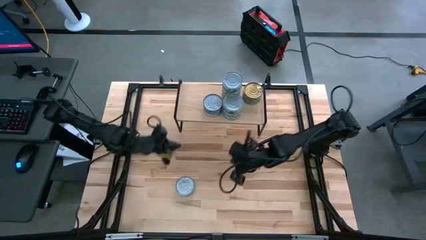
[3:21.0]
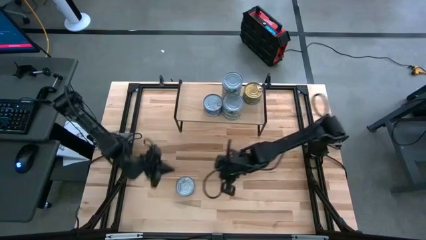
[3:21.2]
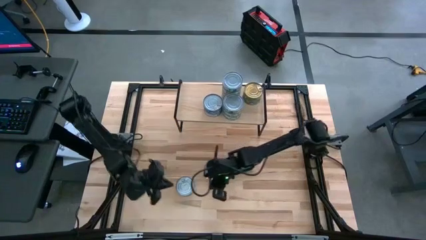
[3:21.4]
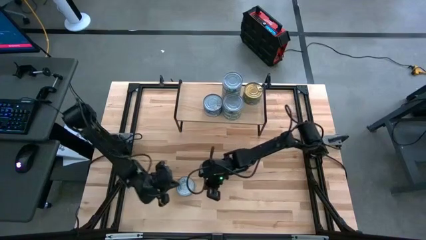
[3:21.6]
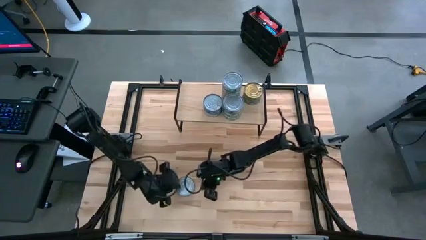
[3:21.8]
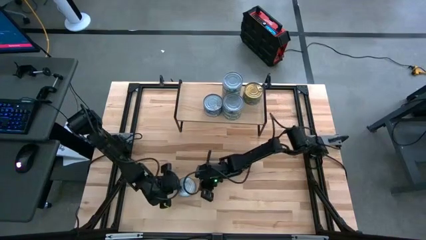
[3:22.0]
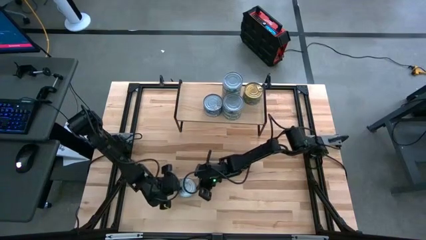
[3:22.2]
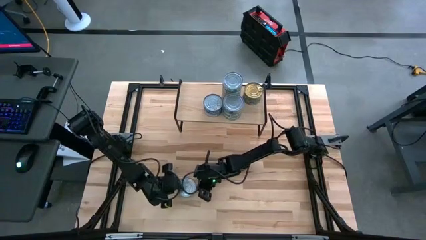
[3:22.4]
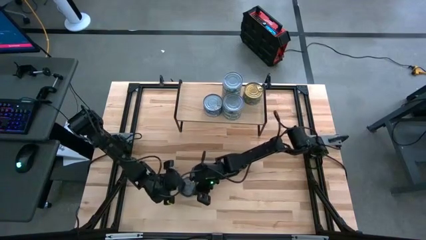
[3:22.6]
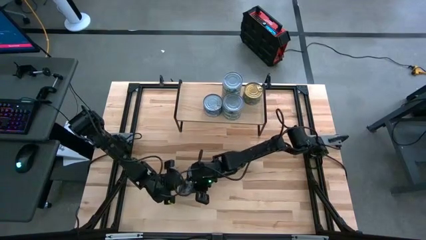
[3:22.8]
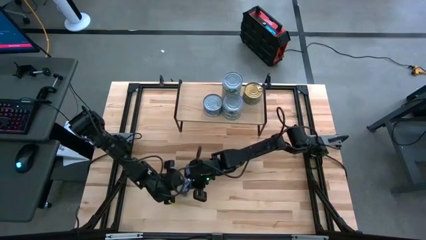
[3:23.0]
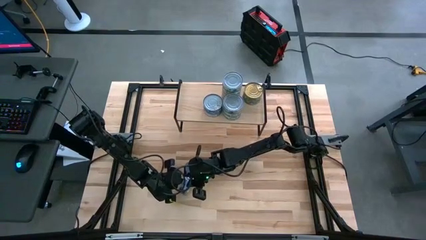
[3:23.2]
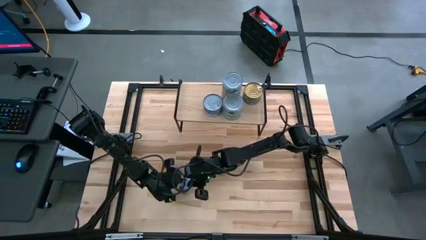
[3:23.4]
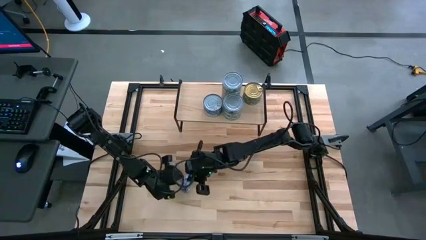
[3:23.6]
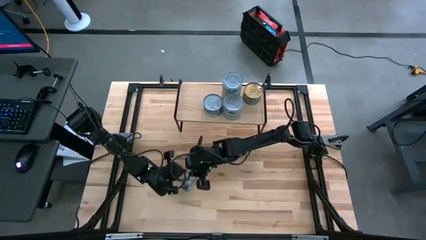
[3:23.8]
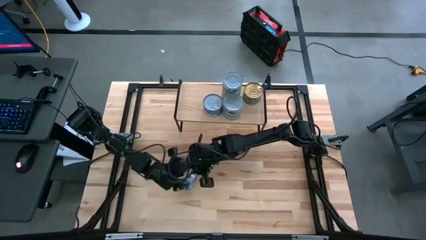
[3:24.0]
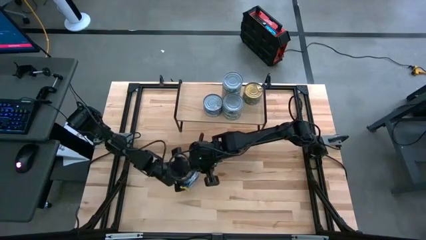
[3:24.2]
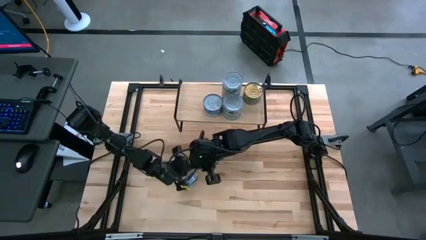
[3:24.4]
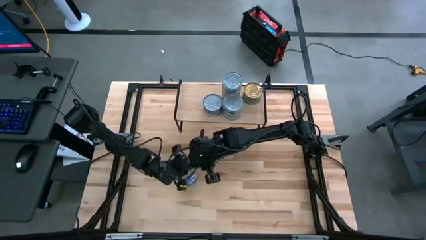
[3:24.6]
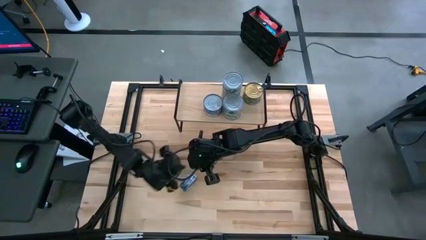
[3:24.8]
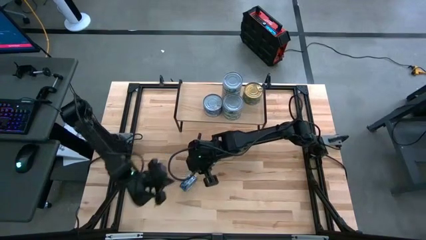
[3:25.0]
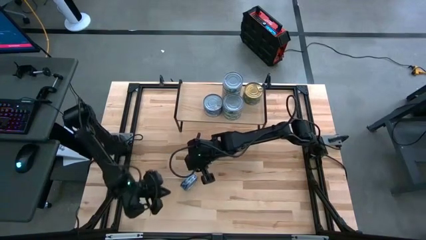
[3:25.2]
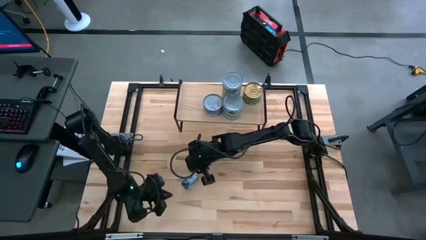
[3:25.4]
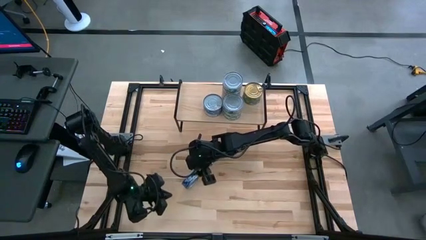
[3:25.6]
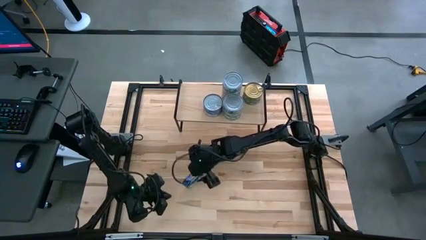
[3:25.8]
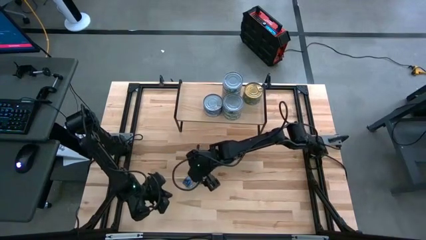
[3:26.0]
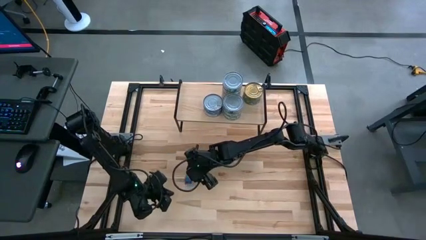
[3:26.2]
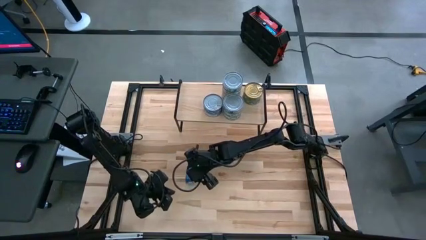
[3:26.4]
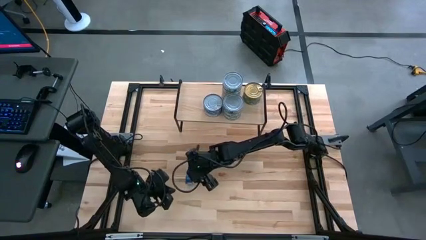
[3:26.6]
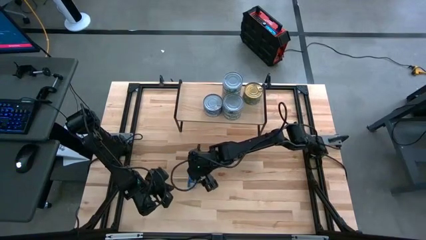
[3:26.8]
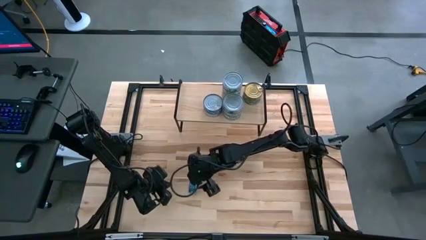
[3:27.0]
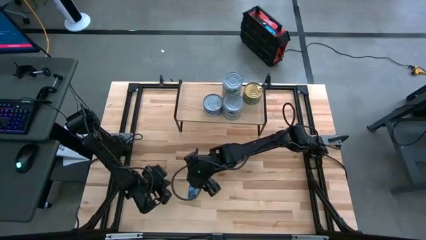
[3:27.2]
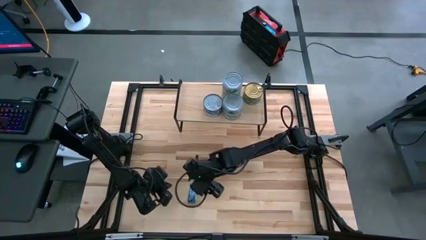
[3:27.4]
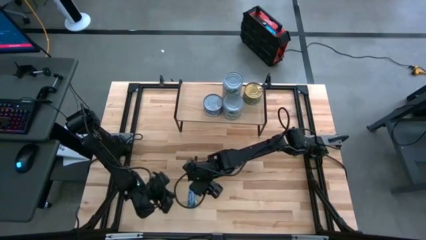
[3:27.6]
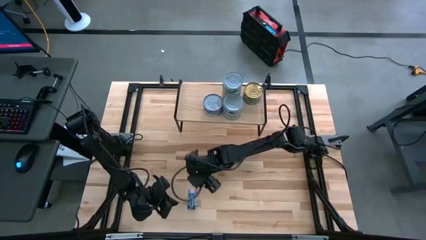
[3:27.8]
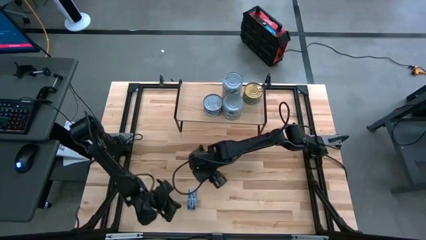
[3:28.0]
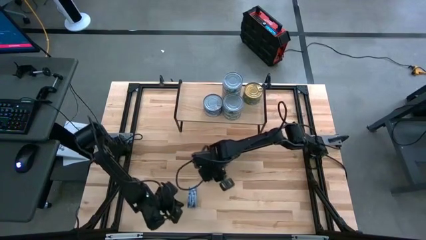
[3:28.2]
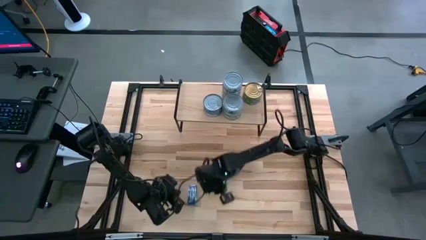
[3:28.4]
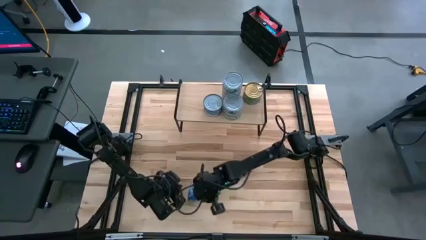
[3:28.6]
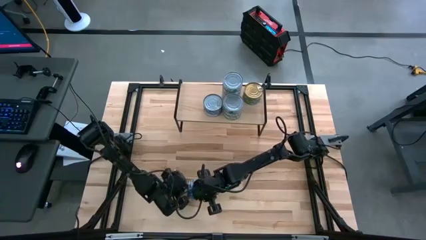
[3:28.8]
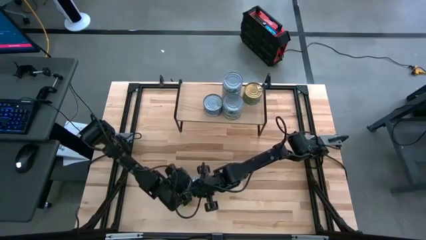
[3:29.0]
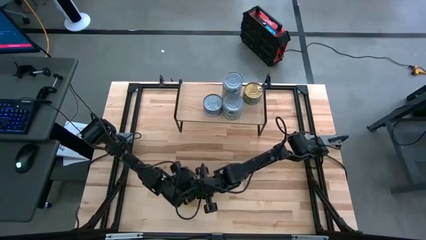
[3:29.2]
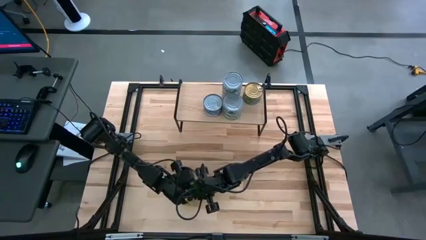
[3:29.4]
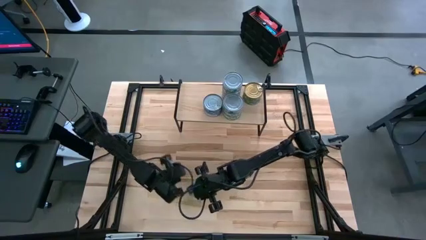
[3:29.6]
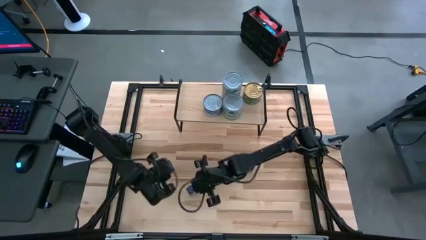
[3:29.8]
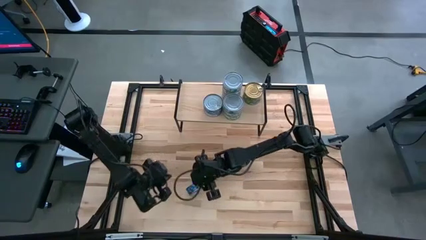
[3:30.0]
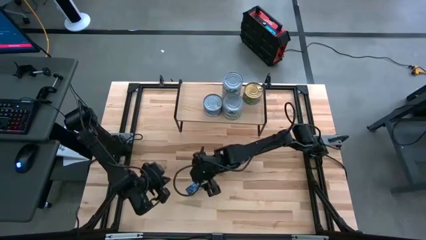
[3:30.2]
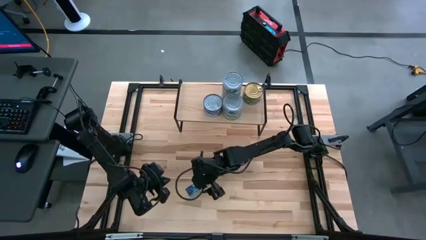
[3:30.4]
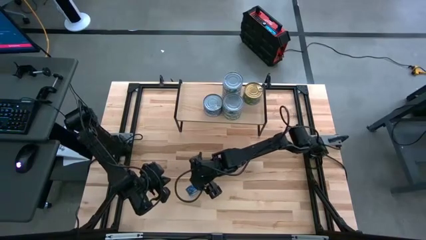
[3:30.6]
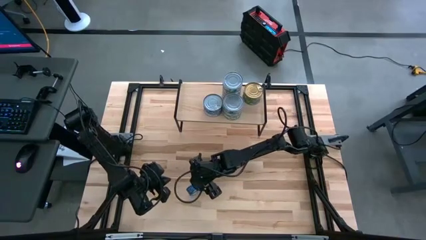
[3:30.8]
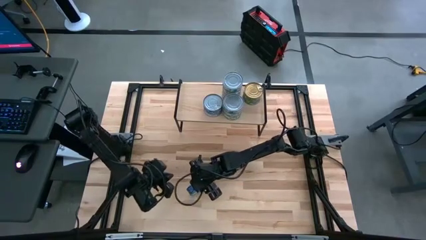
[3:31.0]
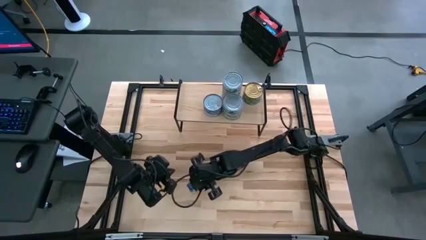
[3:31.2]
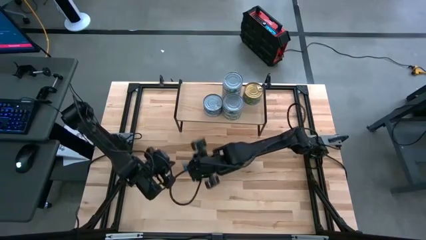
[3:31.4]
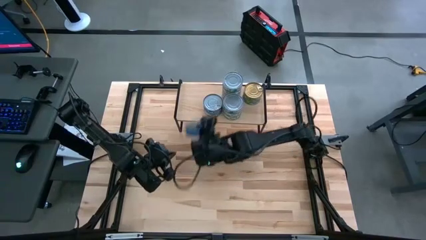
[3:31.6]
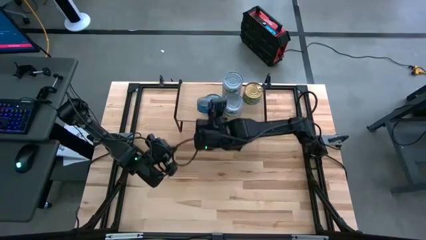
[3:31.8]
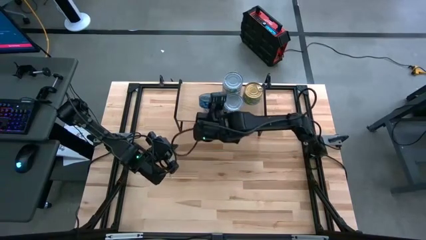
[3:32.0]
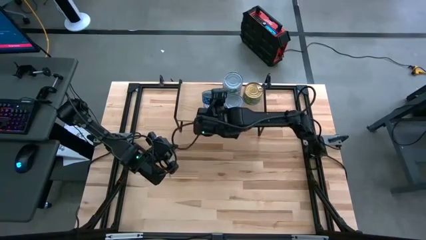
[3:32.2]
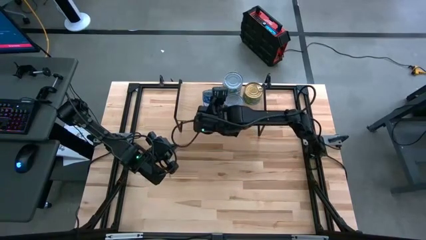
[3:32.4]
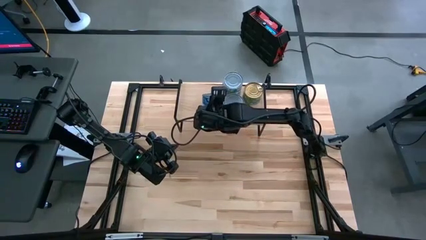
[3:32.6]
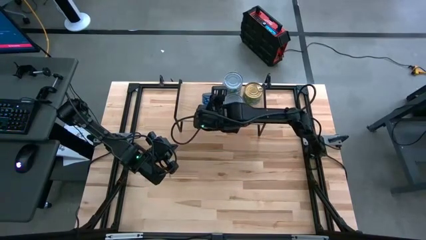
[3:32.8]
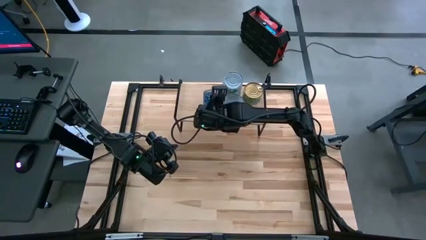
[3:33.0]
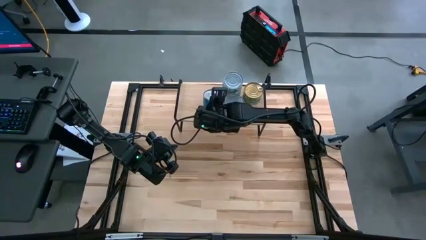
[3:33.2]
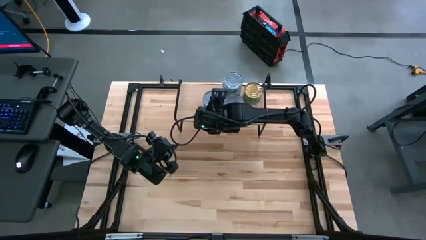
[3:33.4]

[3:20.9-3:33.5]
Task: Stack canned seafood by type on shelf
Stack the blue tuna can on top of the other blue tuna can on the shelf

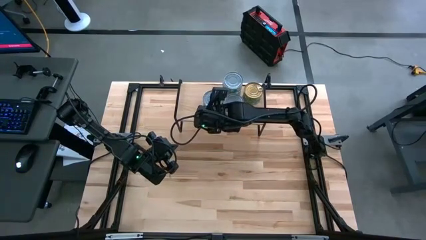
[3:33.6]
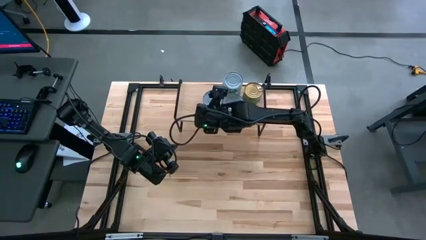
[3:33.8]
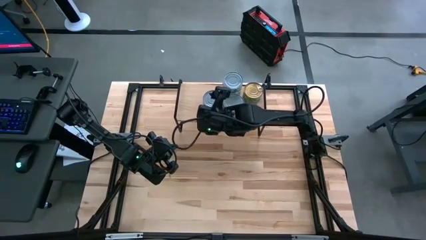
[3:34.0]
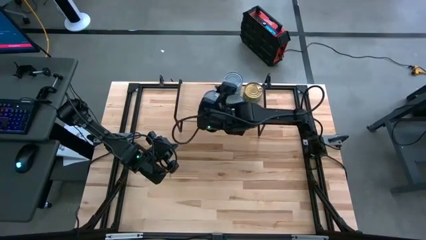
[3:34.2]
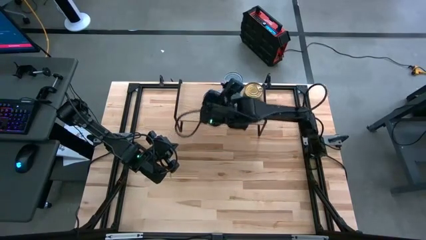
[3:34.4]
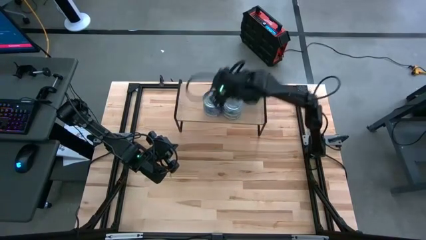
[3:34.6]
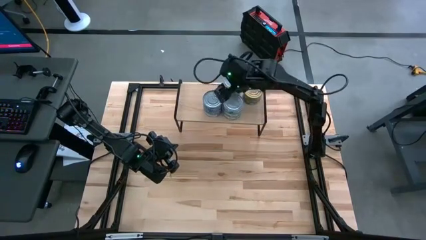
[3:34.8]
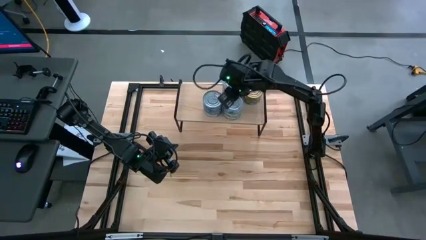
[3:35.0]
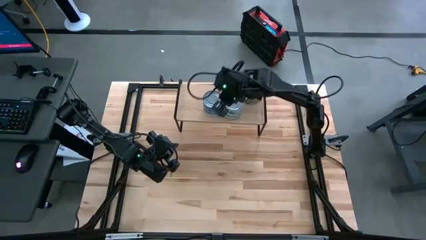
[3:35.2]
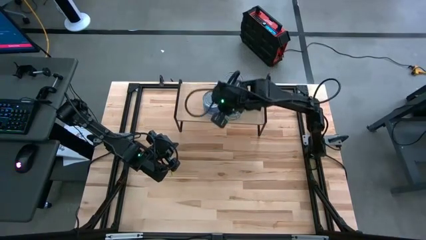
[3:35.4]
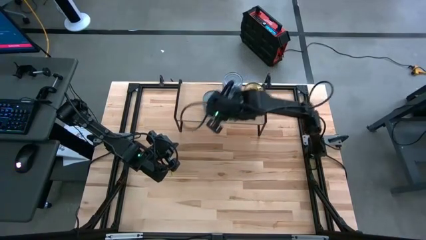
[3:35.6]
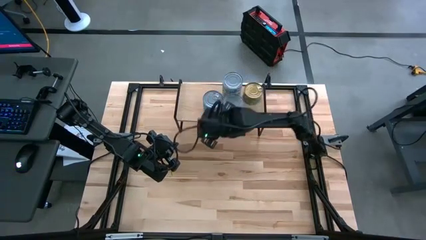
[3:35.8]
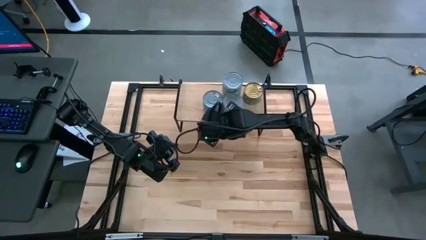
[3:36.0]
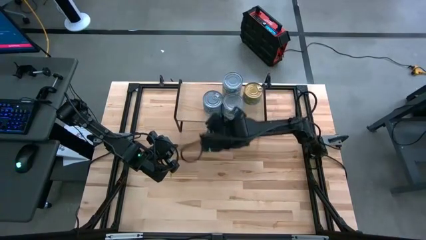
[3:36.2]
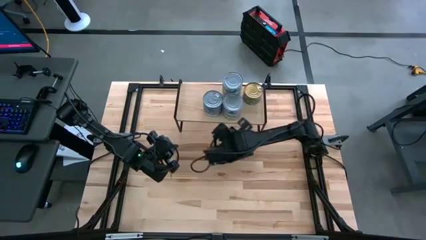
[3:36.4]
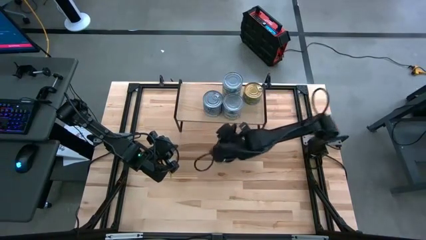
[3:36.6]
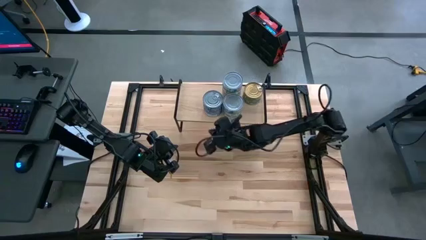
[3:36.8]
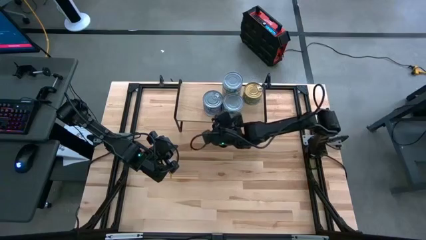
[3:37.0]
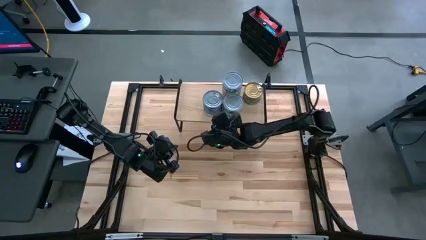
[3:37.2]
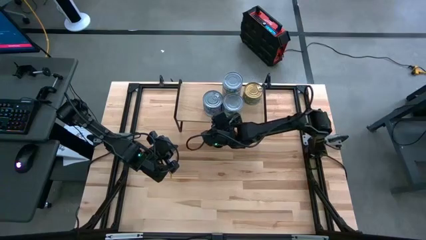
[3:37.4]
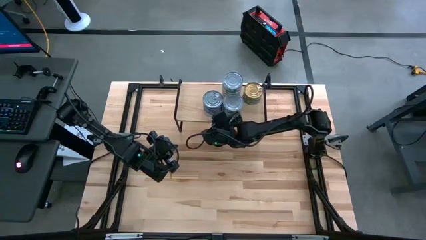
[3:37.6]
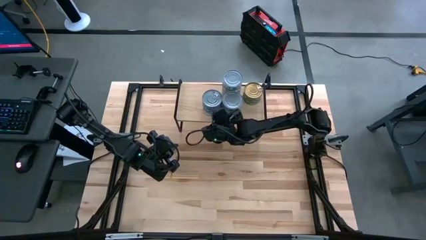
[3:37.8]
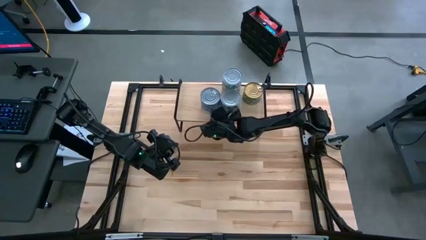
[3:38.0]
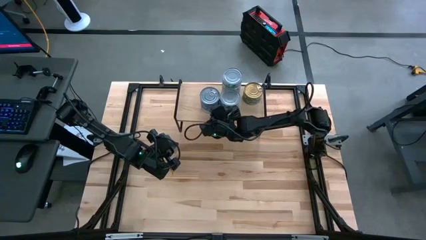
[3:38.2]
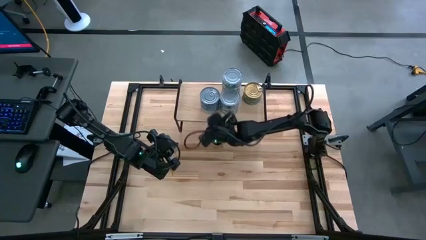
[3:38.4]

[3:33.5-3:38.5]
Adjust the blue tuna cans on the shelf
